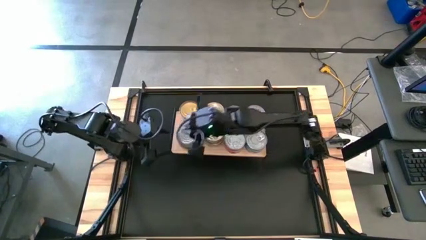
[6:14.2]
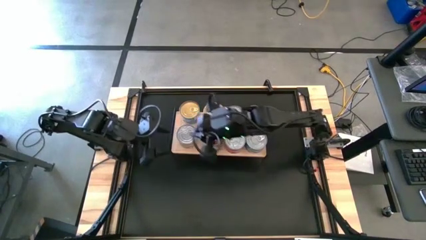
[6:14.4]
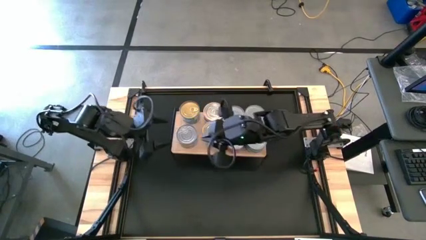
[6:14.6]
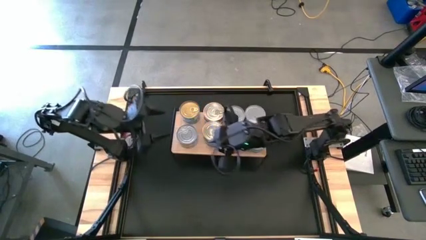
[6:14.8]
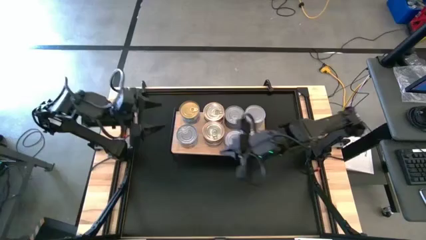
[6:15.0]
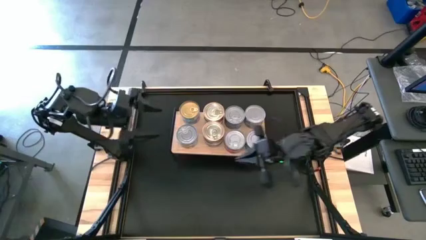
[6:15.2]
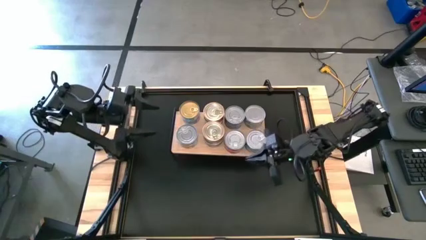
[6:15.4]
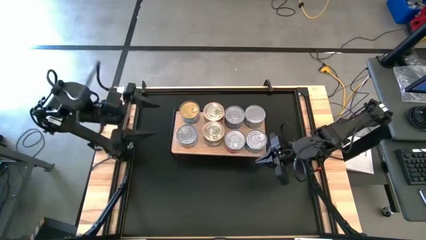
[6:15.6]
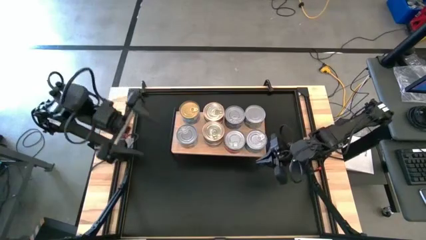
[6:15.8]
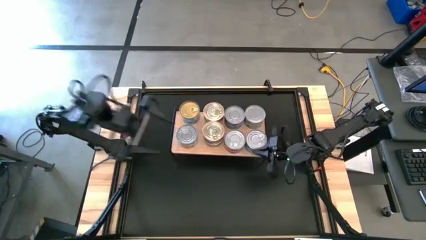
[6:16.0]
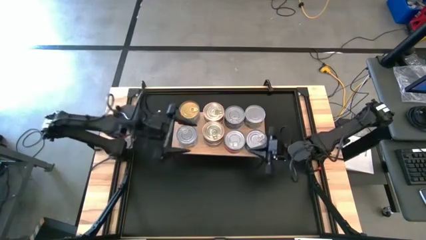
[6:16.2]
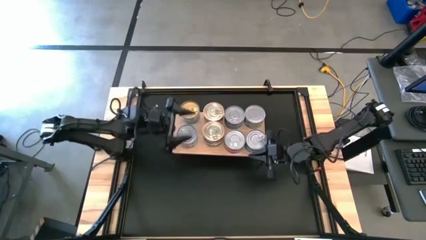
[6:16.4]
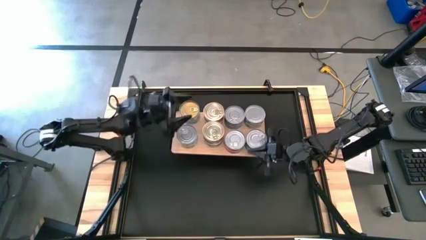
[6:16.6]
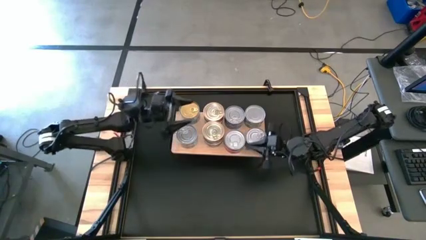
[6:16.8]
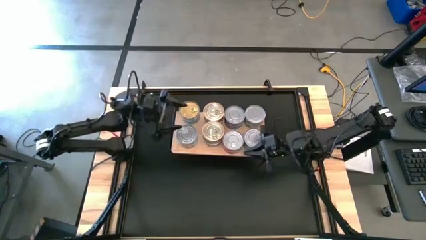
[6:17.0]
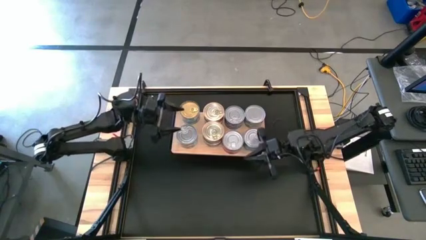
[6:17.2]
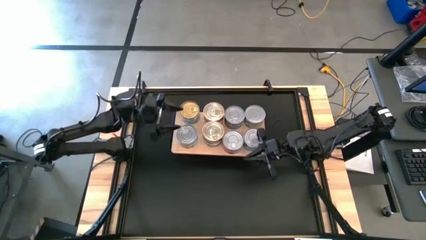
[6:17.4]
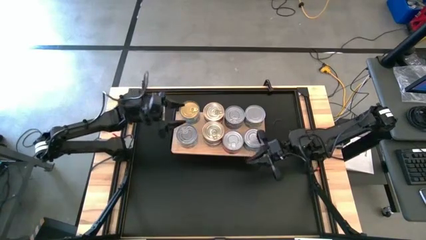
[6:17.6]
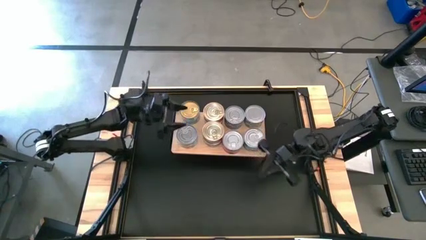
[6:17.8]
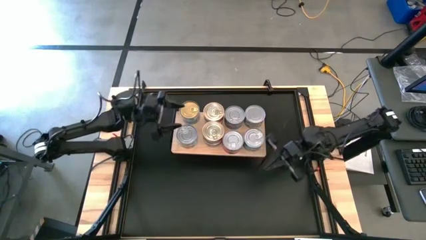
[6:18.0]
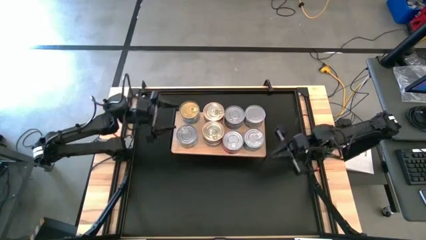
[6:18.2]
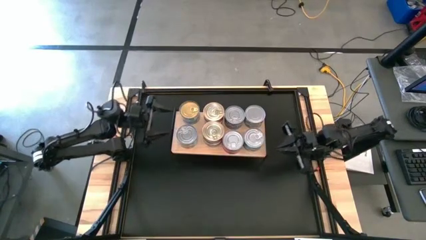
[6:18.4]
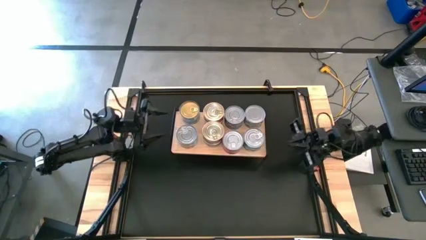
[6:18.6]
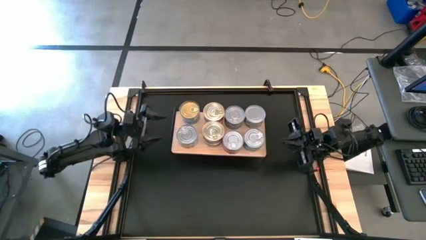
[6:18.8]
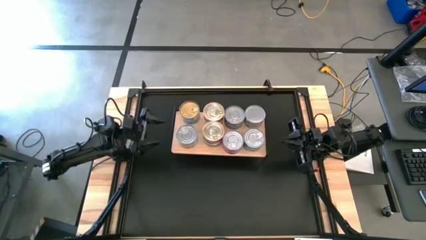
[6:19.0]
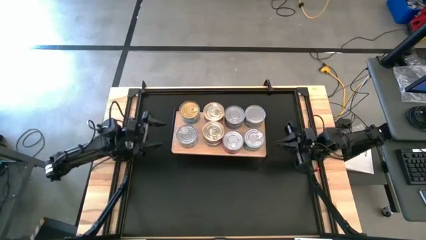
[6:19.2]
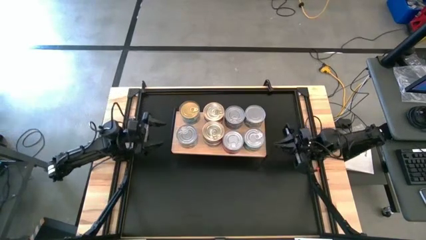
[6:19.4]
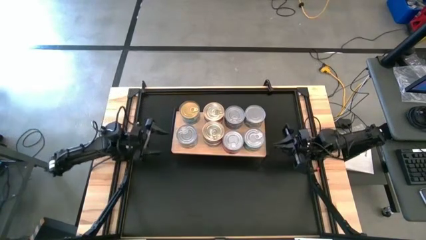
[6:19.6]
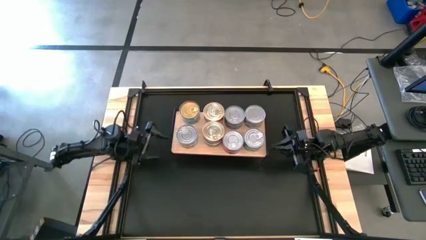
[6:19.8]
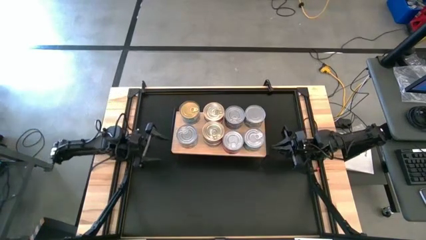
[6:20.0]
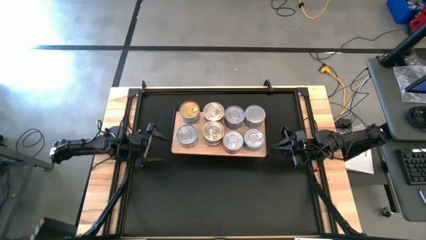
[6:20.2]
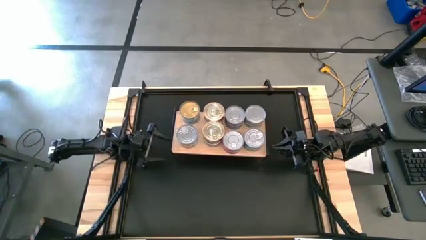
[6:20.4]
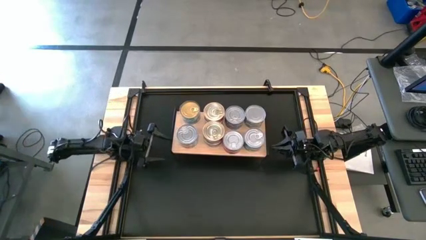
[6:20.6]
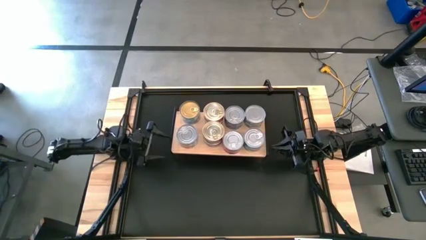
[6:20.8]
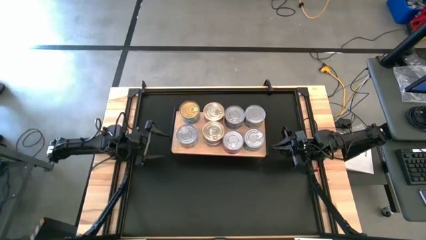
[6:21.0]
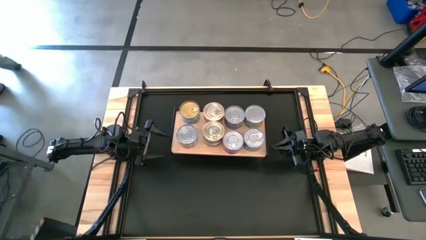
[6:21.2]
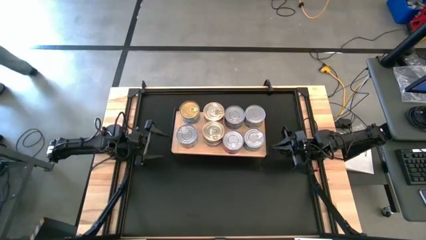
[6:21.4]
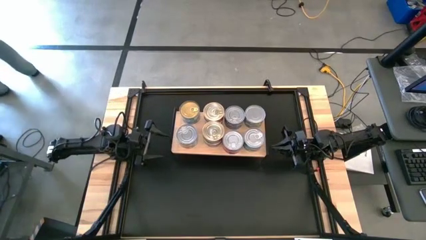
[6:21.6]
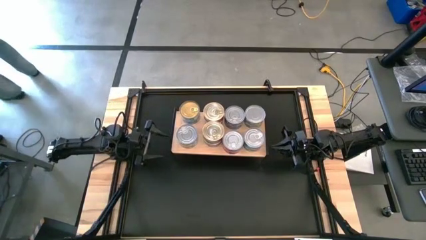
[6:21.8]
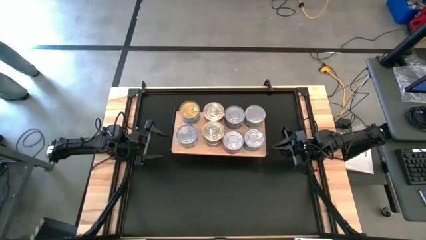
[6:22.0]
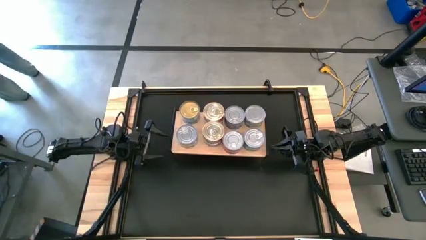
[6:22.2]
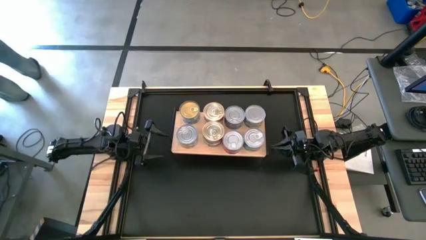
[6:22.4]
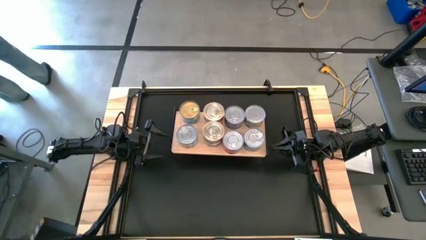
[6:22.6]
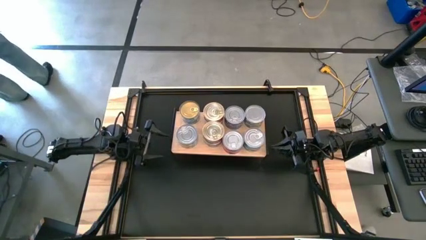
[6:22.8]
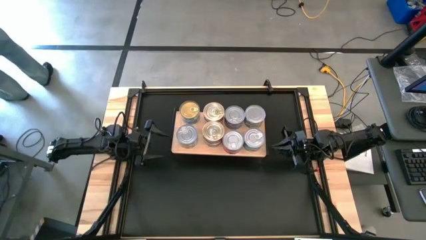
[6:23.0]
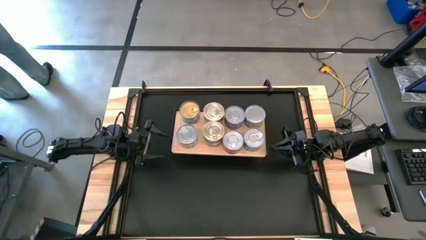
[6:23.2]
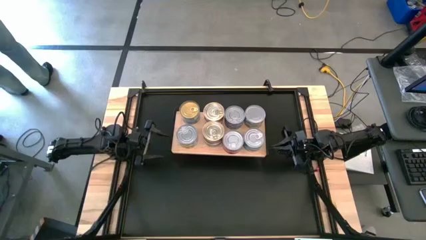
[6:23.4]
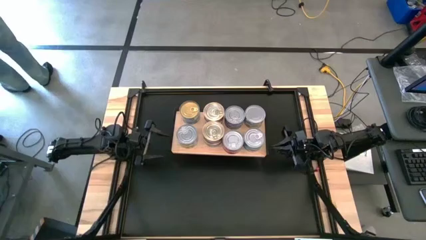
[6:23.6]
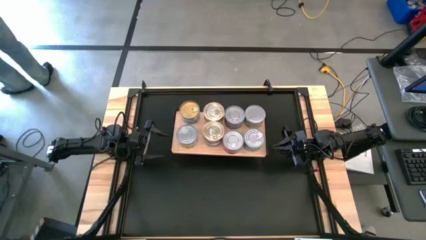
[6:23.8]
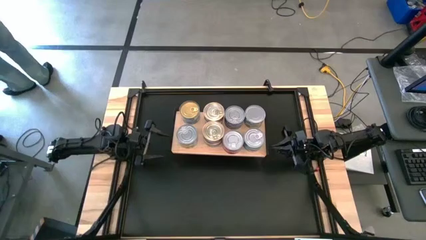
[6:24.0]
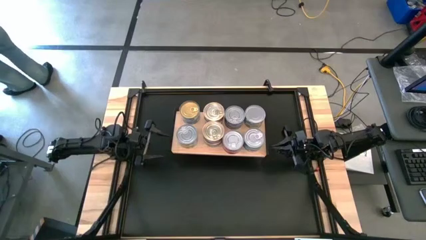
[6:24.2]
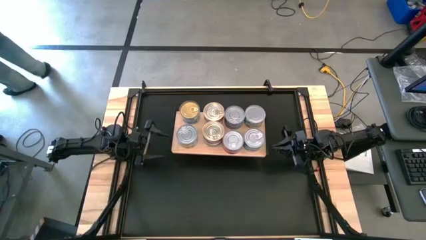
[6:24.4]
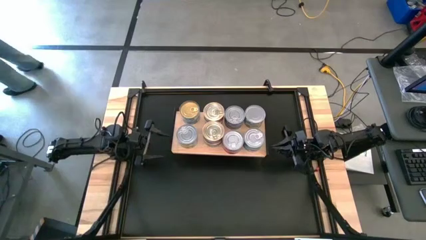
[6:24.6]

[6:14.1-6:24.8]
Task: Stack canned seafood by type on shelf
Return to Home Position

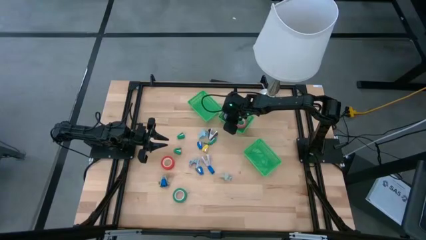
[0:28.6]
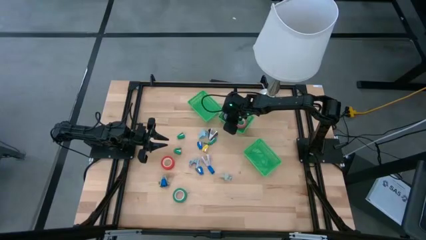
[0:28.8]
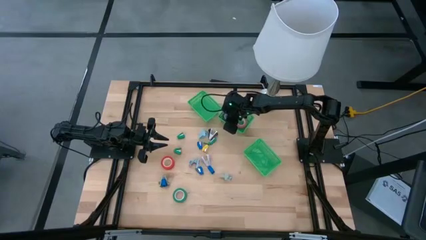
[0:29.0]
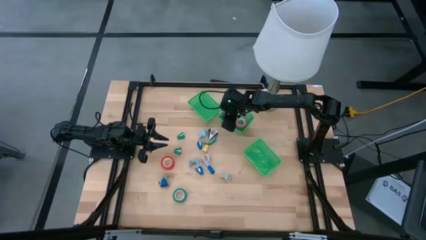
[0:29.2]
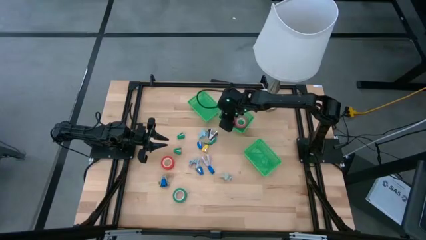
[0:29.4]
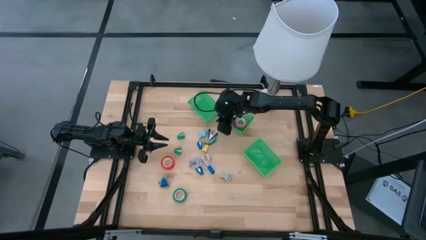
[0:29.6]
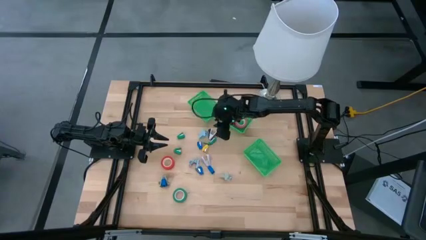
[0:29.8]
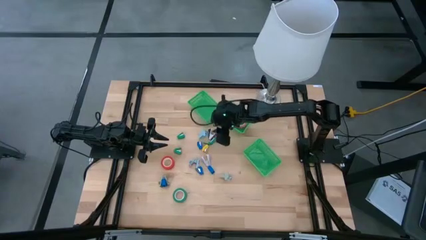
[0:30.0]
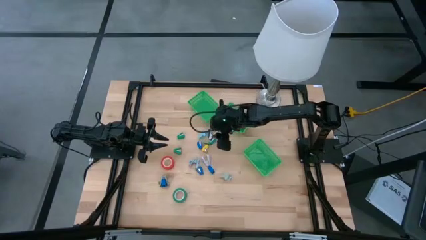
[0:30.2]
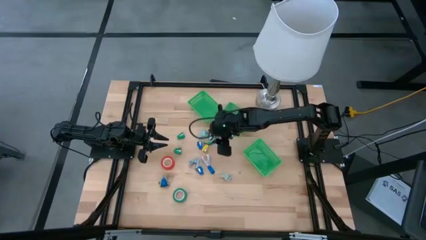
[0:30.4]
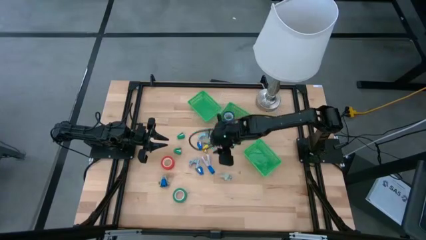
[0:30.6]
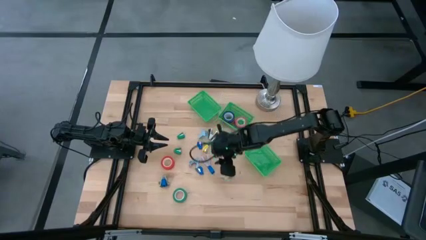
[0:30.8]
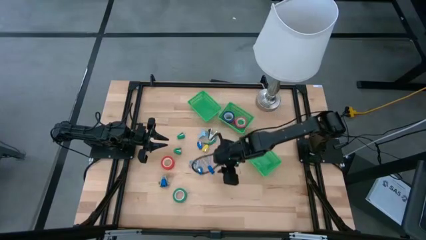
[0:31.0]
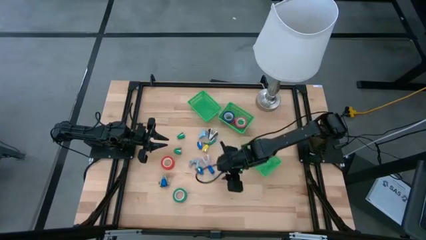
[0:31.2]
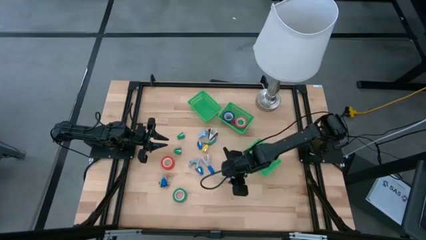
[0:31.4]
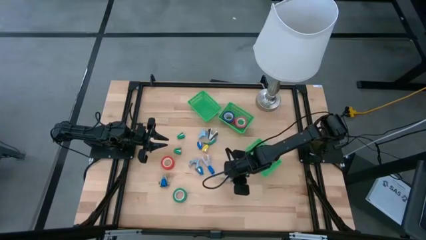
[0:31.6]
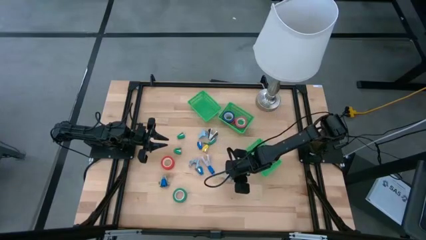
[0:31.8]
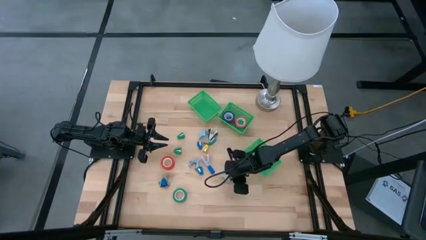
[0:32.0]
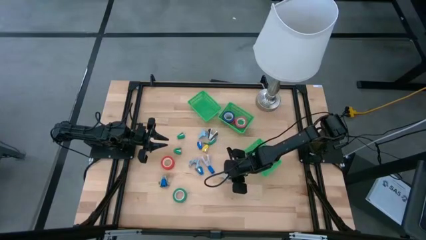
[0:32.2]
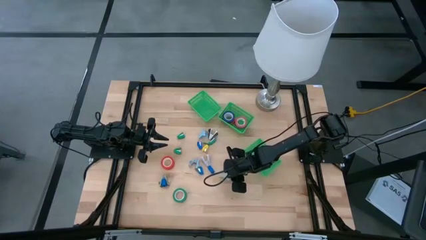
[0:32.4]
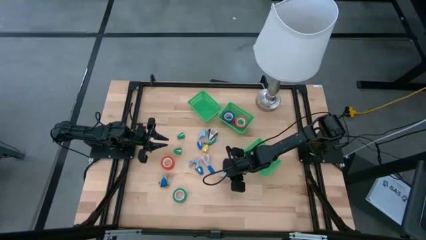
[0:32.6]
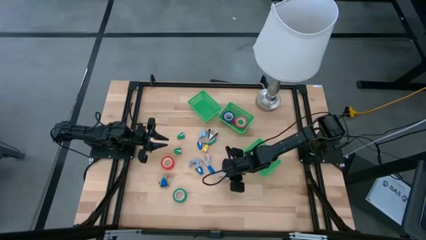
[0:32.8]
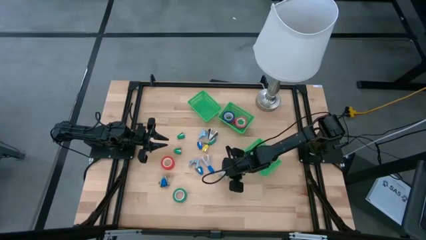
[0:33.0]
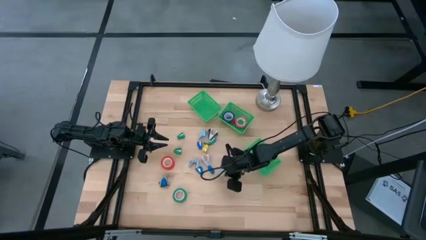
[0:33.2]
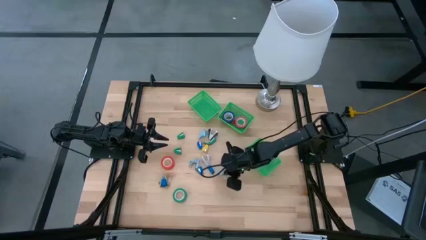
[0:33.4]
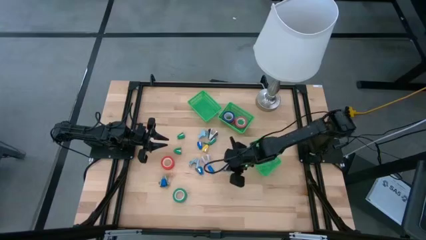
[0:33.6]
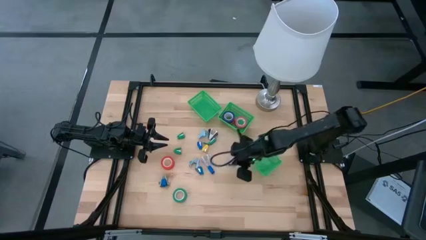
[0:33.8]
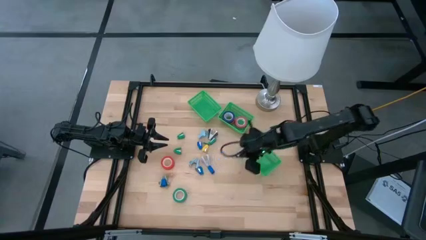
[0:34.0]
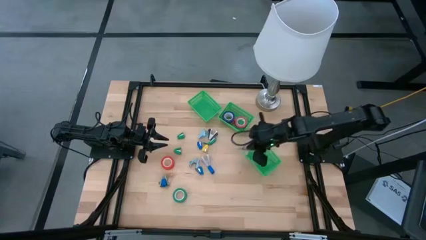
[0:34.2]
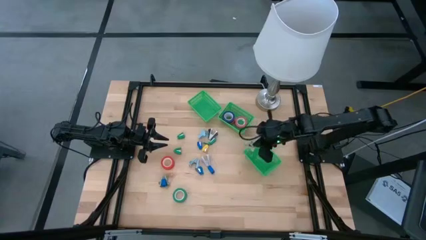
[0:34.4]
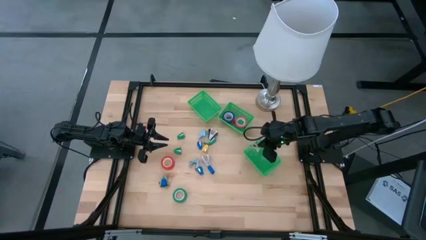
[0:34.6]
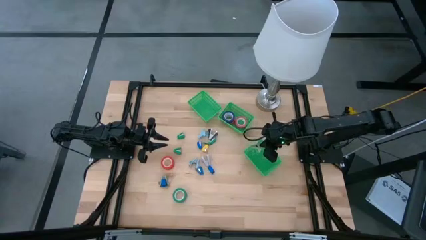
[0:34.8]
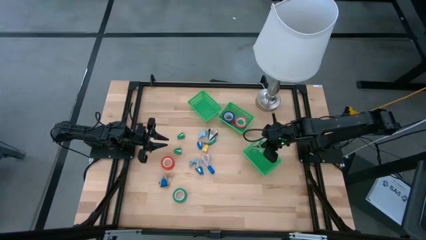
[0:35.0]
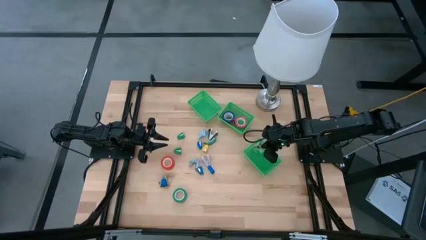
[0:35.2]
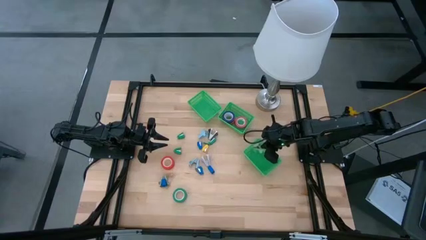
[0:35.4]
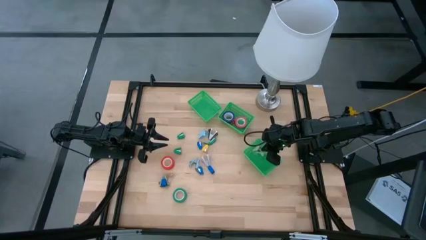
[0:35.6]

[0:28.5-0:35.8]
Task: Pick and place Stapler, Stapler remover, tape
Put the right gray staple remover into the bottom basket
